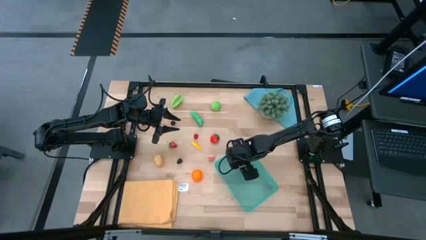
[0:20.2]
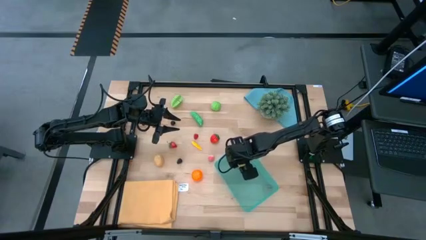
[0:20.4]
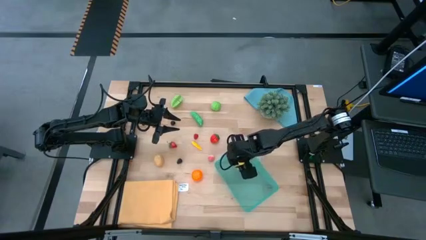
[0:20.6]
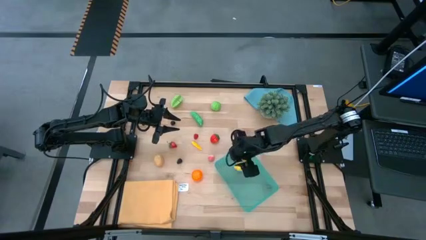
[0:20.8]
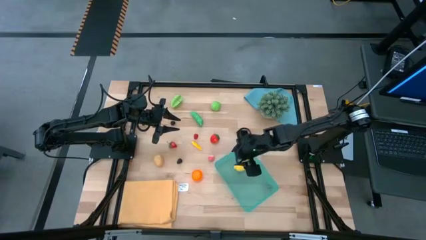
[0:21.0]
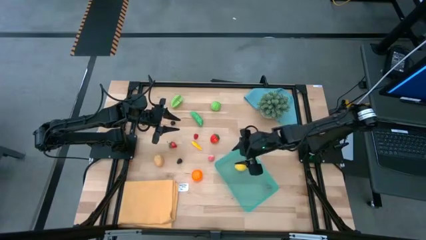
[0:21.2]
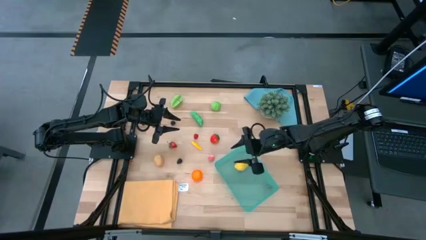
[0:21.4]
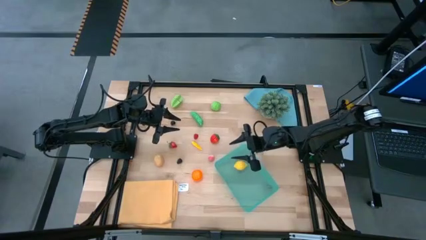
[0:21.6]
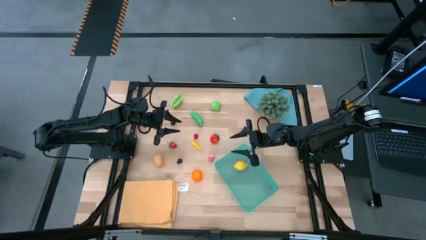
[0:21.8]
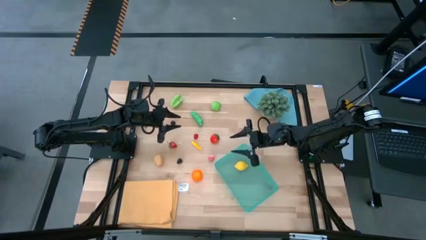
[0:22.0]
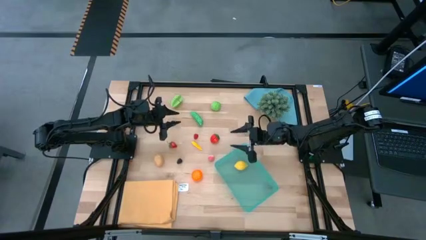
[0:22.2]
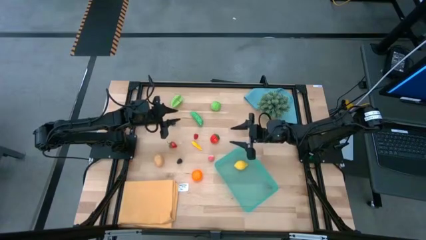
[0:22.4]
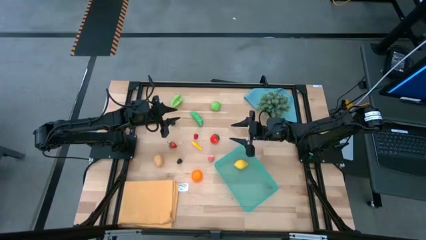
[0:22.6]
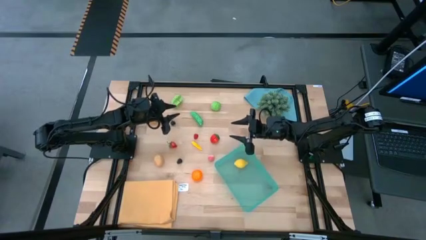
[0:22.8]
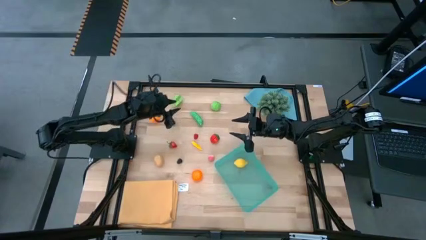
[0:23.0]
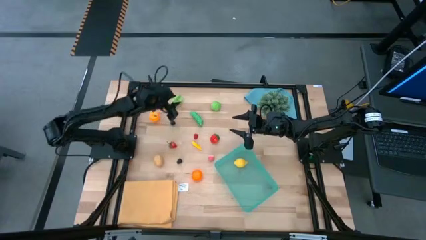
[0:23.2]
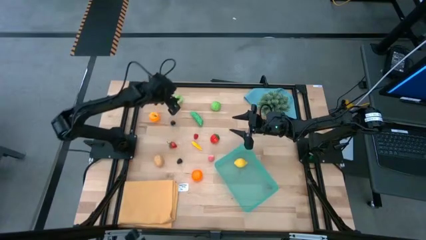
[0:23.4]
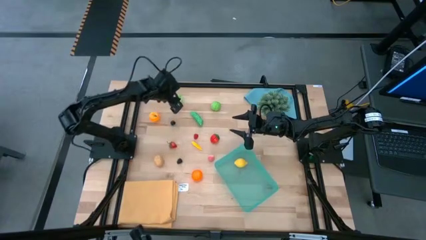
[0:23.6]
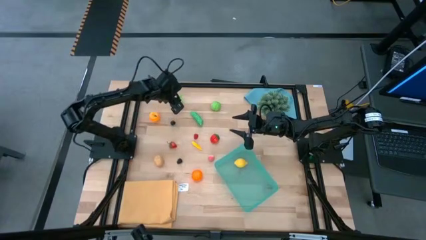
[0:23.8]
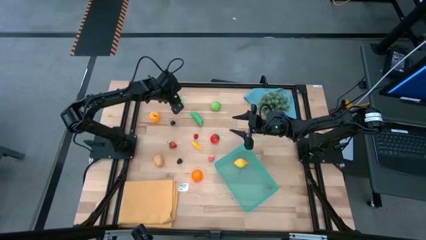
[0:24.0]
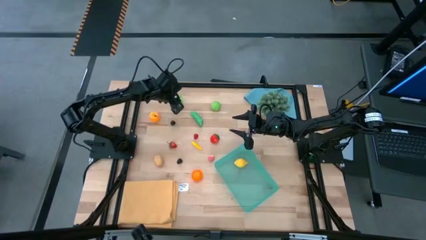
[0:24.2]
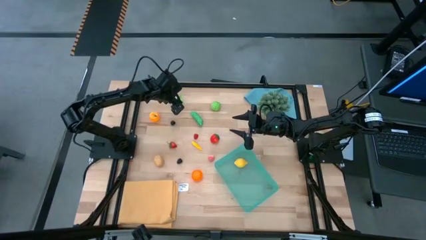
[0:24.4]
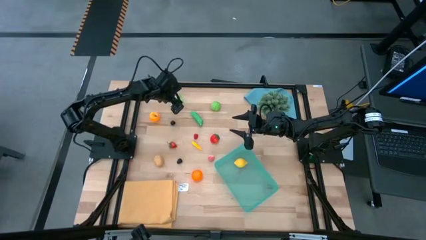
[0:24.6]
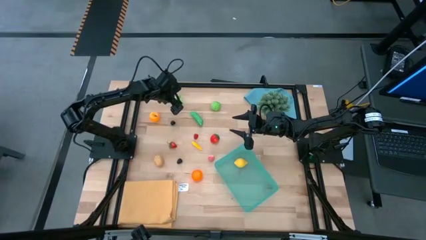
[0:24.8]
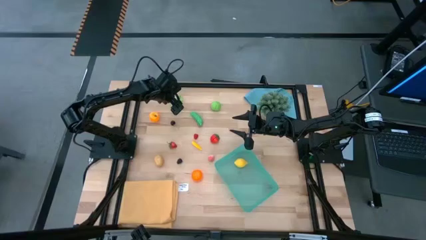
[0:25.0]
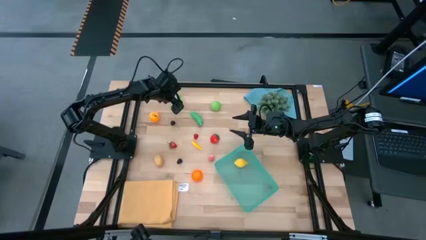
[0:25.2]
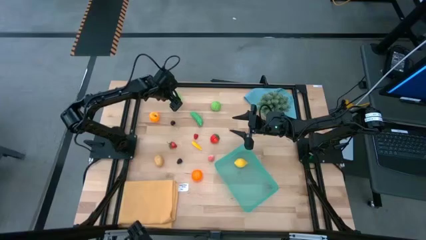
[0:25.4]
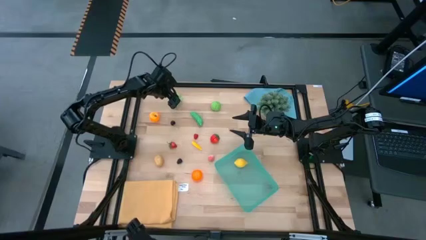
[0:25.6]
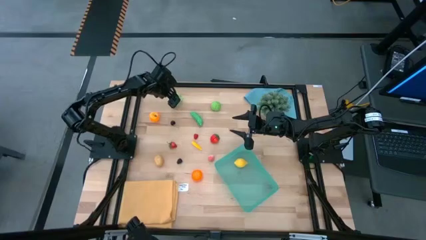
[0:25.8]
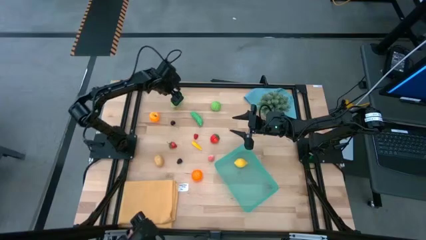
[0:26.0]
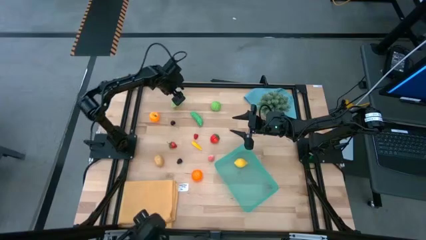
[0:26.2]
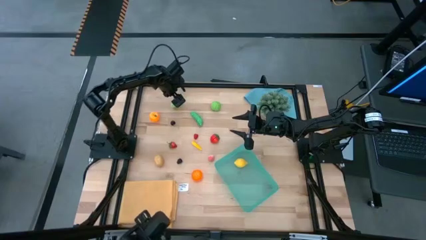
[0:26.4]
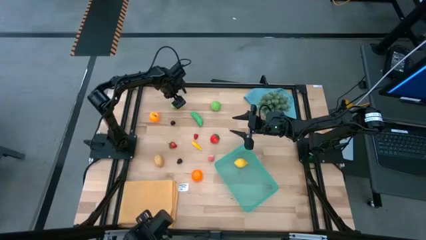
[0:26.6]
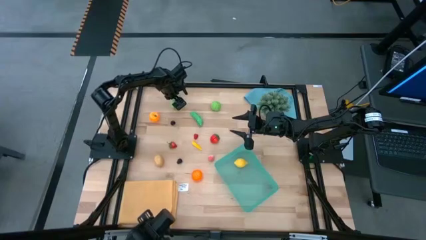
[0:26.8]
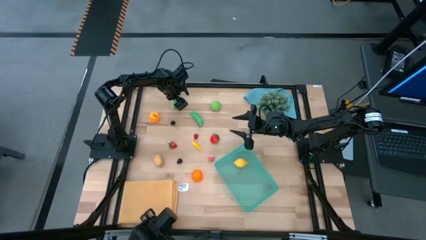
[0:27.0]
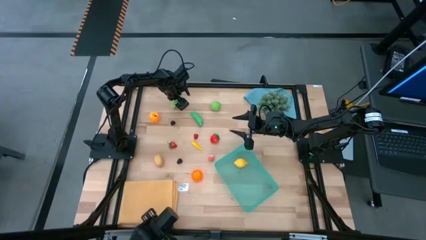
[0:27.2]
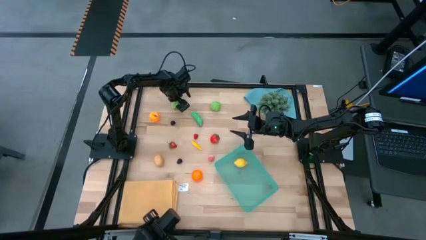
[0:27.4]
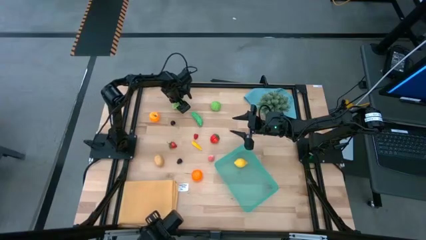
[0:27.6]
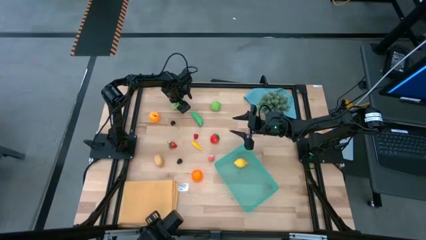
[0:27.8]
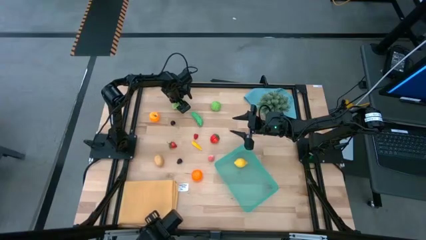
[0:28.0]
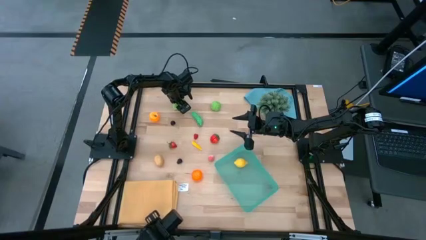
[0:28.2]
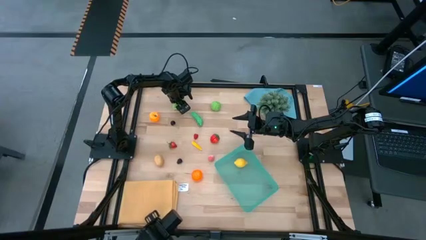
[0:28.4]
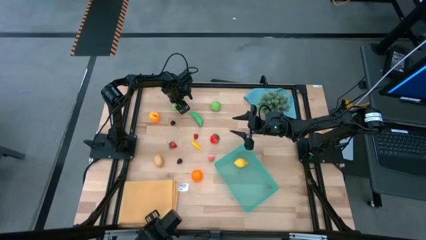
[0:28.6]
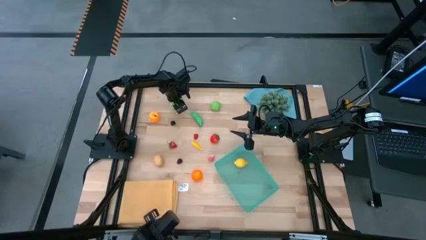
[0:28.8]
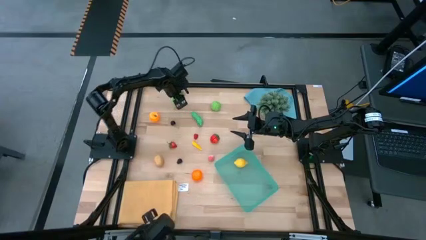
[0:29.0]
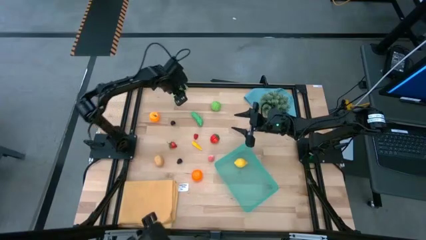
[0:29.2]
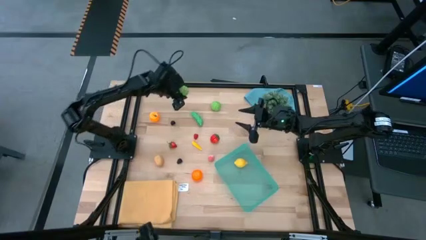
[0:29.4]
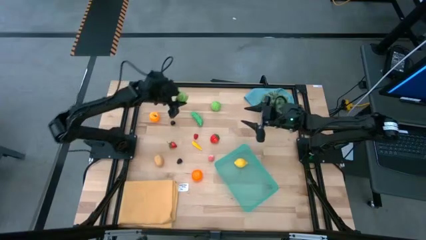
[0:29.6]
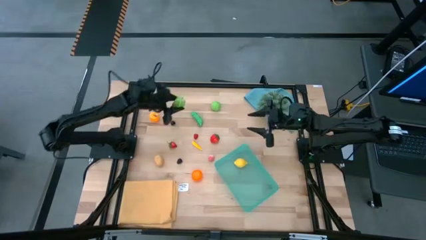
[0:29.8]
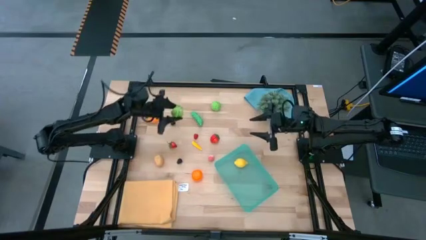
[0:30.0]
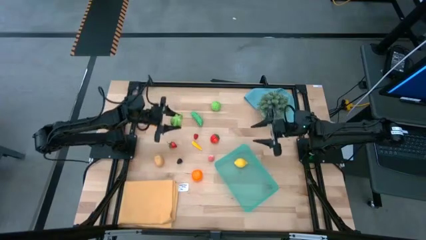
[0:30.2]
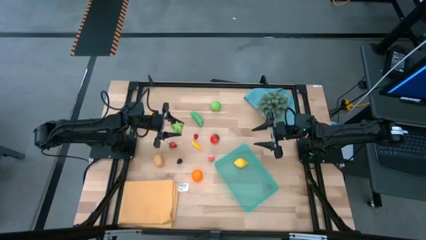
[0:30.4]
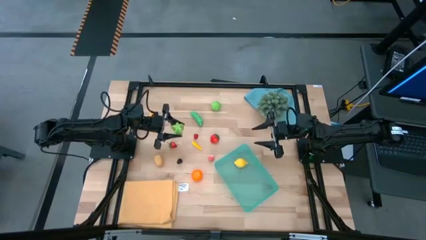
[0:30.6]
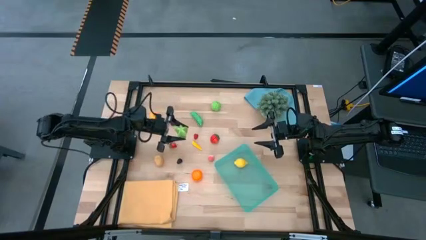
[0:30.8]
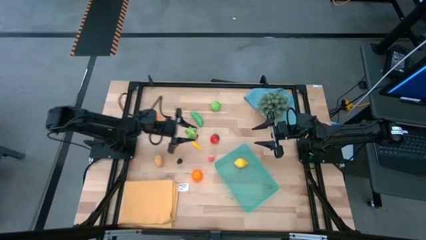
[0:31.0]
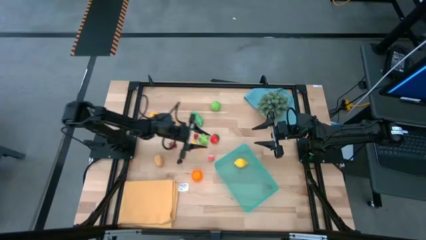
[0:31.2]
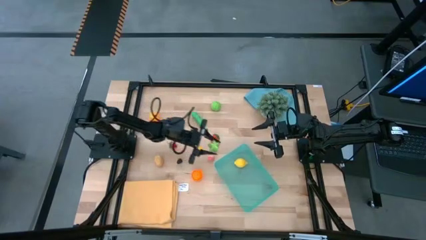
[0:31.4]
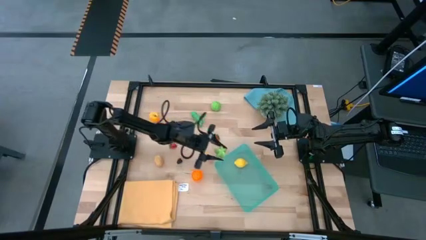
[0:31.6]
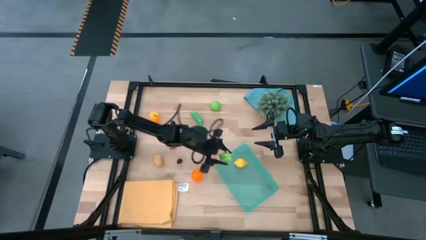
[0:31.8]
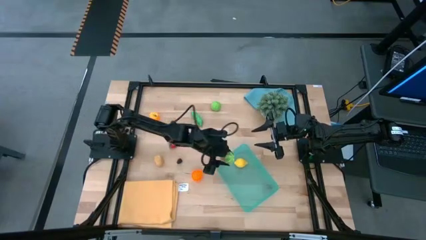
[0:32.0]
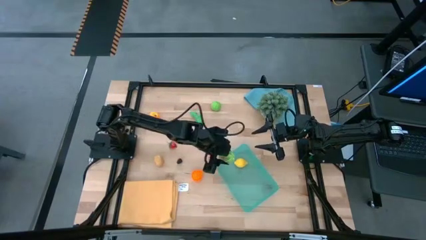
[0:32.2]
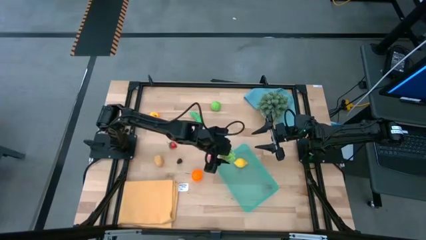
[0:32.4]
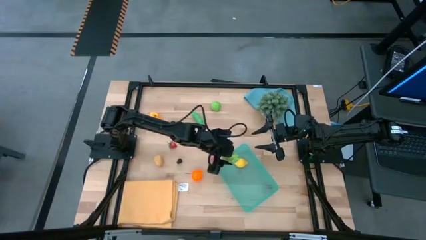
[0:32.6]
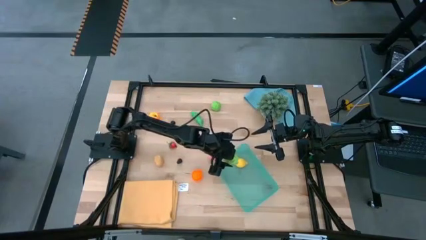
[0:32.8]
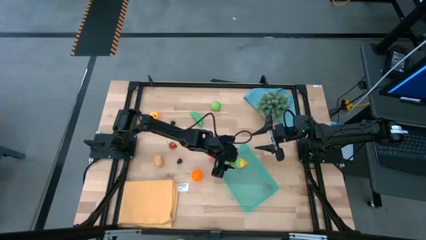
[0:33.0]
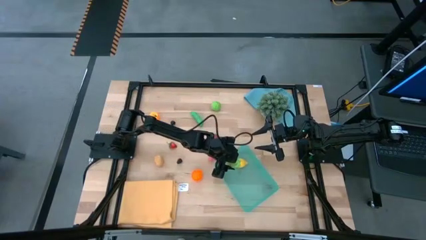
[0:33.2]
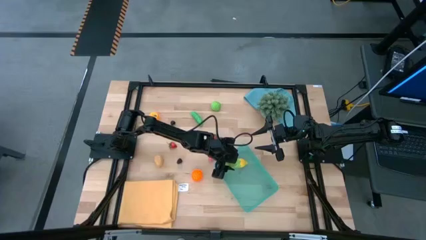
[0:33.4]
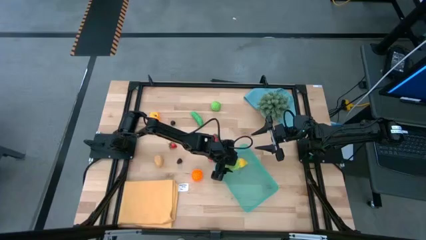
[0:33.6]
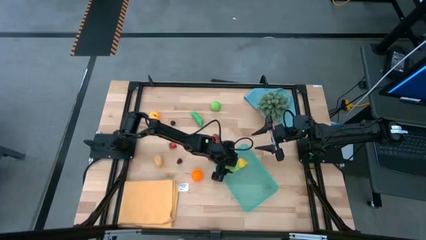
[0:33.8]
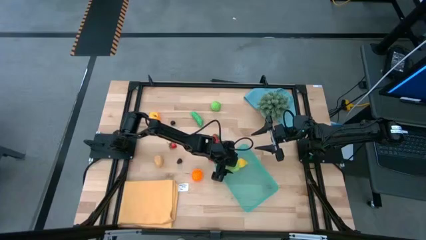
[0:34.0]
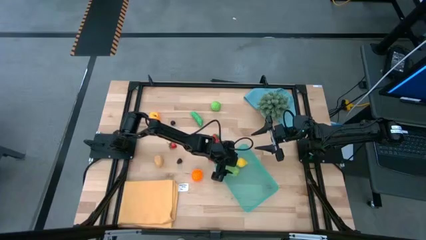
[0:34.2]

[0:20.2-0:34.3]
Task: Pick and placing Produce into tupperware
Put the starfruit into the green bin

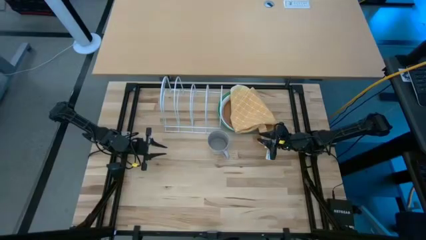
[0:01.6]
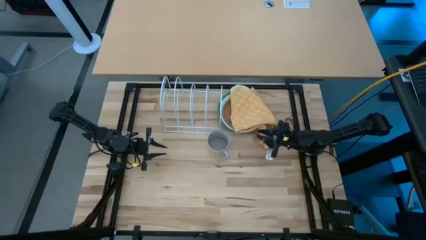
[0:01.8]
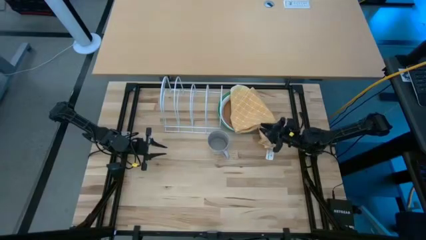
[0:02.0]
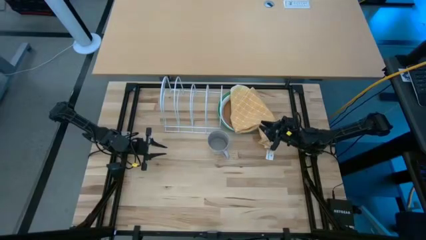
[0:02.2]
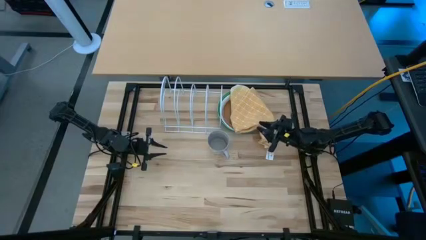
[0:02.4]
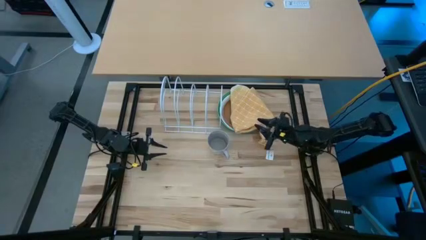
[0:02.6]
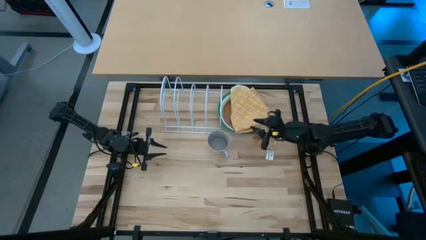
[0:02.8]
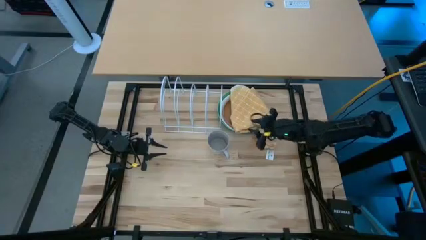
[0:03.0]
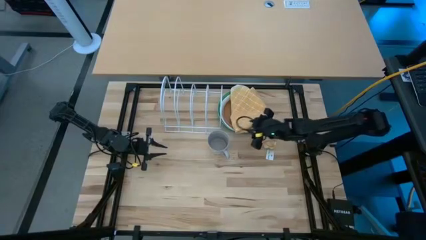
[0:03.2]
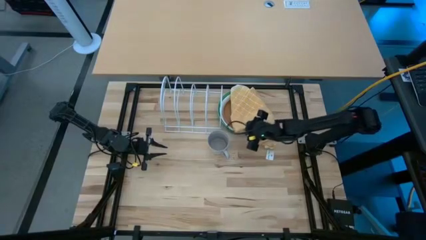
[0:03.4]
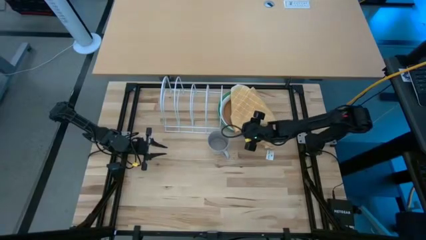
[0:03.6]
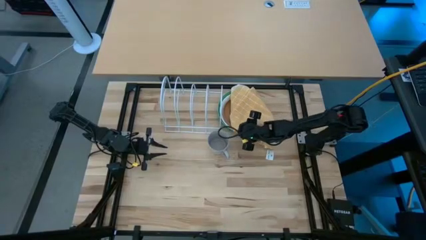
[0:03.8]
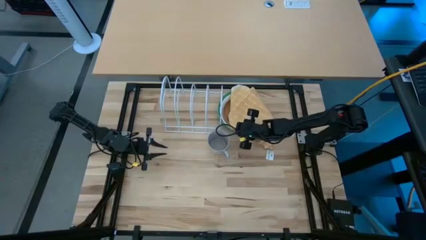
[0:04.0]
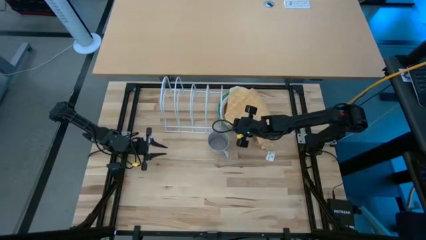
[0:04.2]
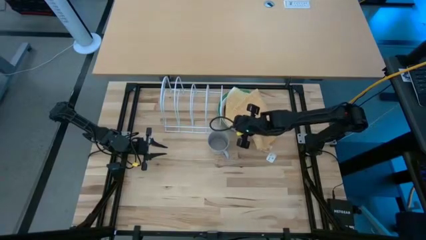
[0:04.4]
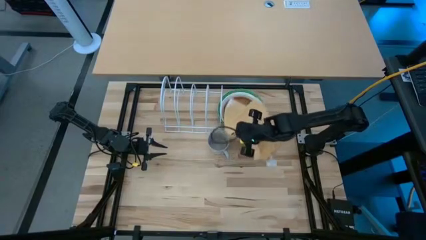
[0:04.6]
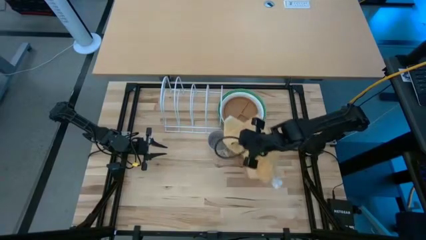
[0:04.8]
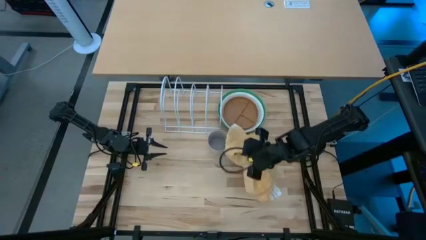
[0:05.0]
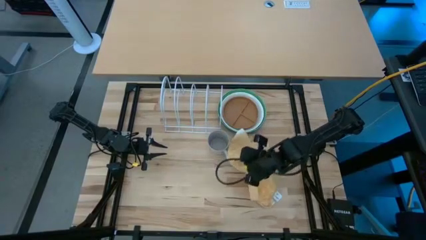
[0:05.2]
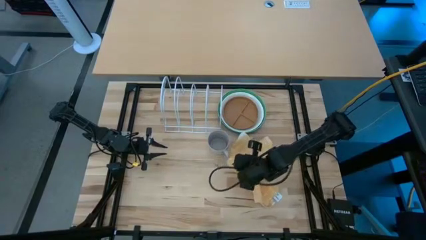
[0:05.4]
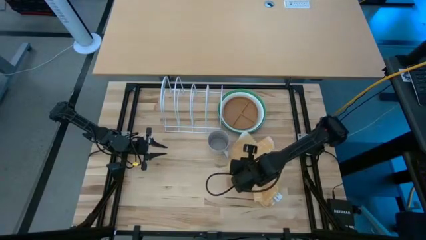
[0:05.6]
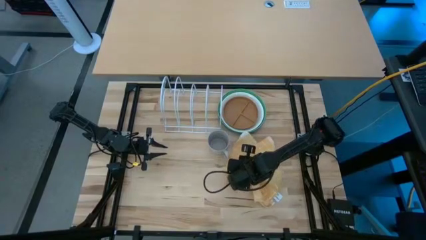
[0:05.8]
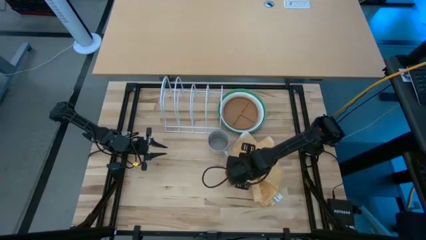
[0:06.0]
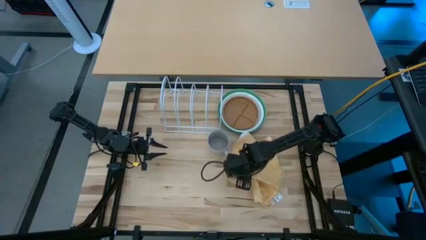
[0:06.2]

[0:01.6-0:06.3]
Task: Sort dishes
Move the yellow towel closer to the center
